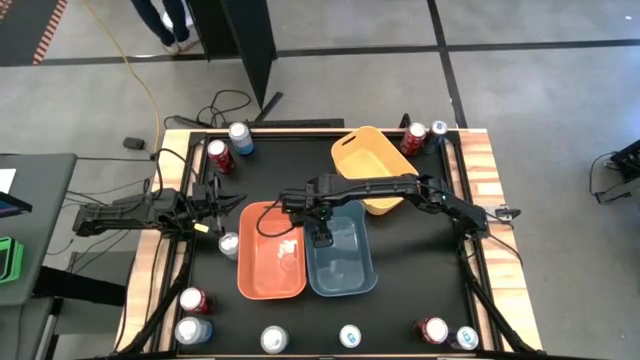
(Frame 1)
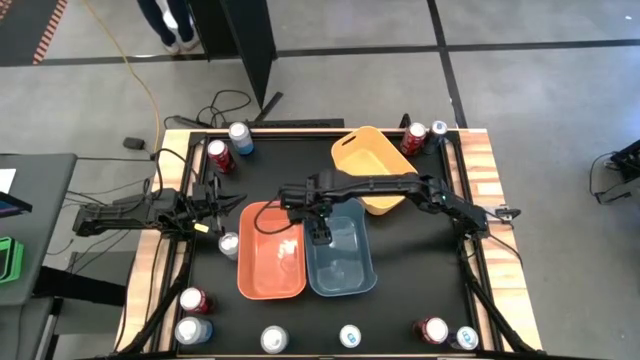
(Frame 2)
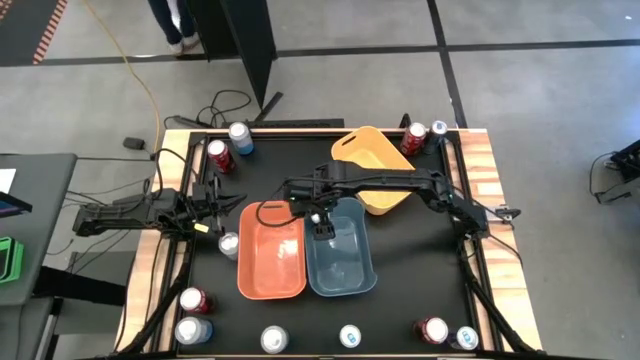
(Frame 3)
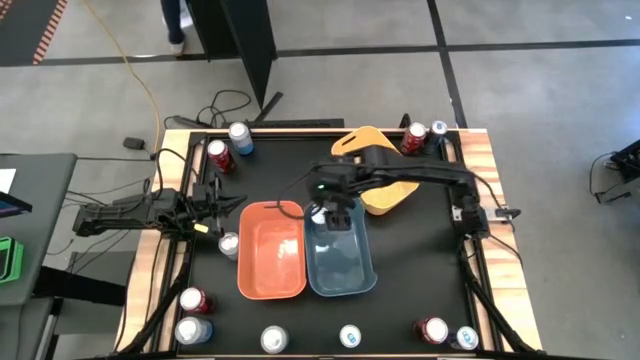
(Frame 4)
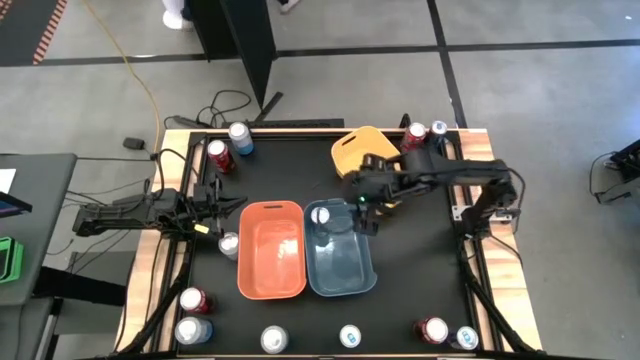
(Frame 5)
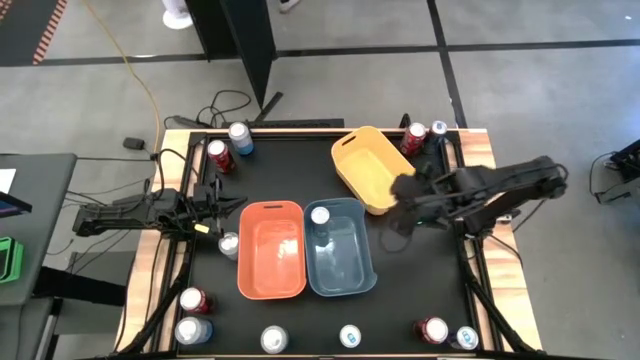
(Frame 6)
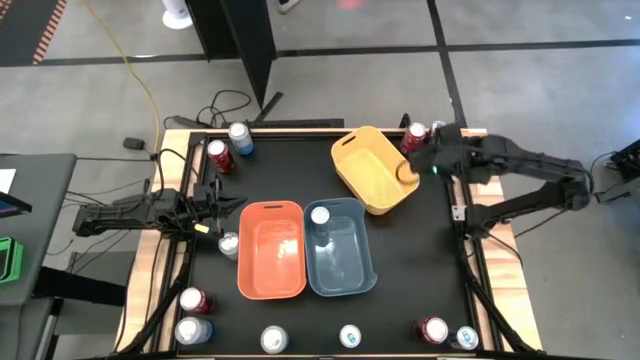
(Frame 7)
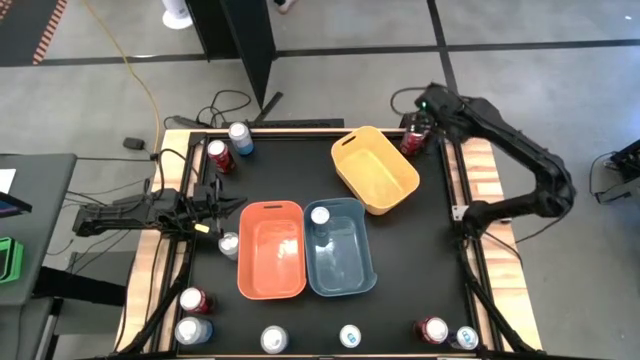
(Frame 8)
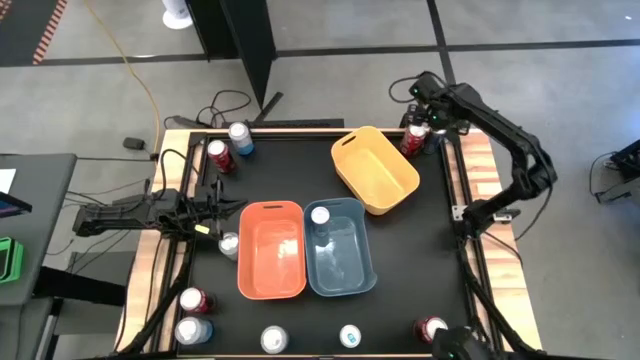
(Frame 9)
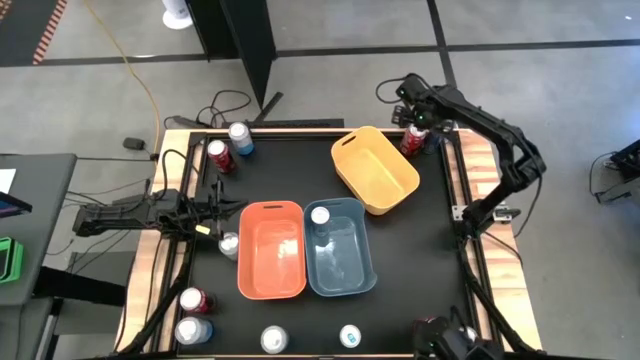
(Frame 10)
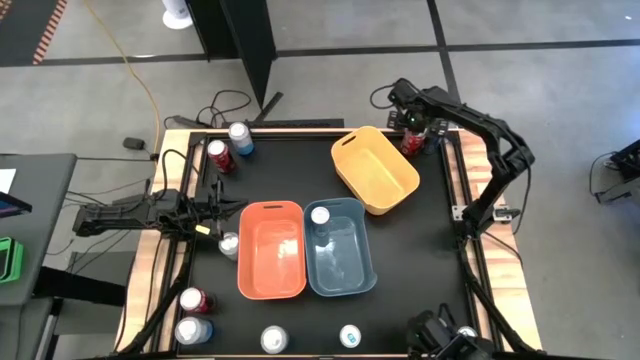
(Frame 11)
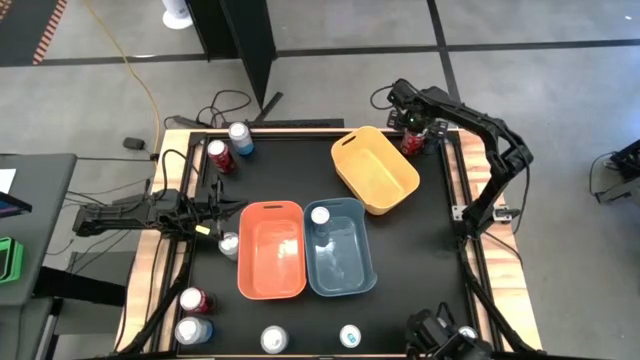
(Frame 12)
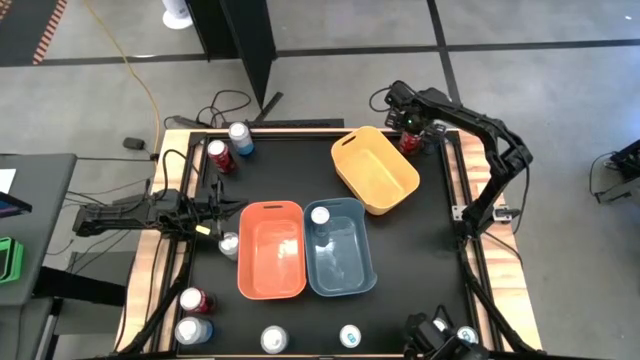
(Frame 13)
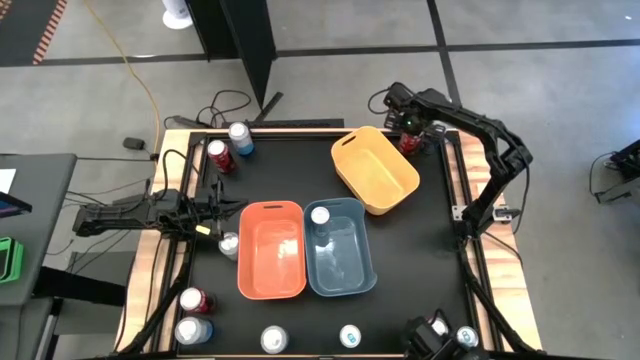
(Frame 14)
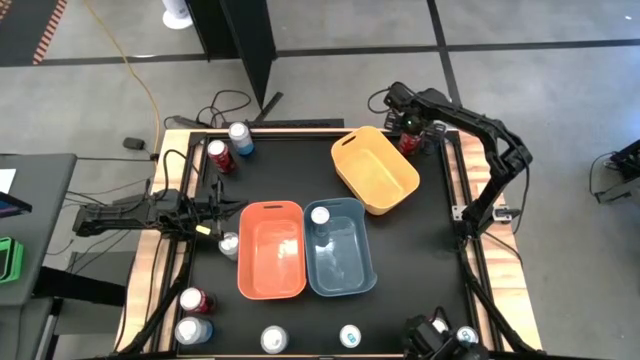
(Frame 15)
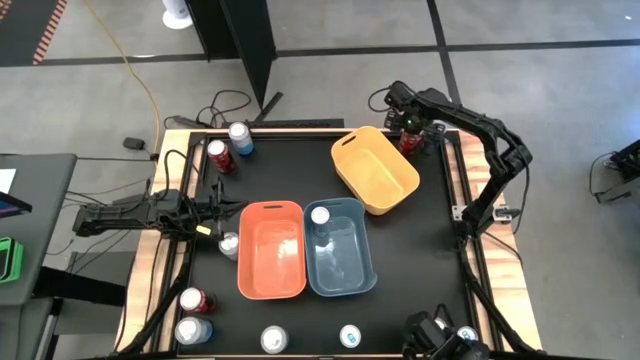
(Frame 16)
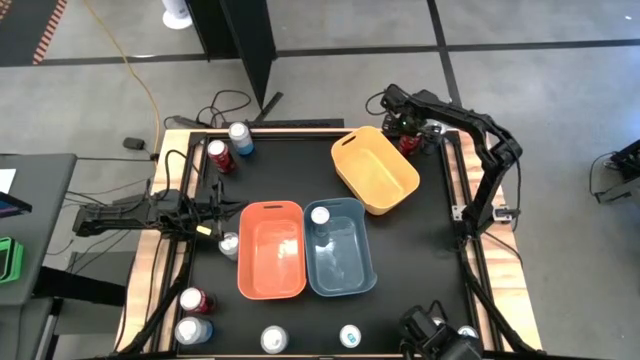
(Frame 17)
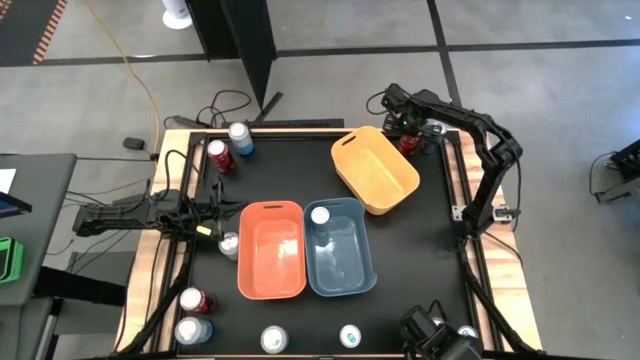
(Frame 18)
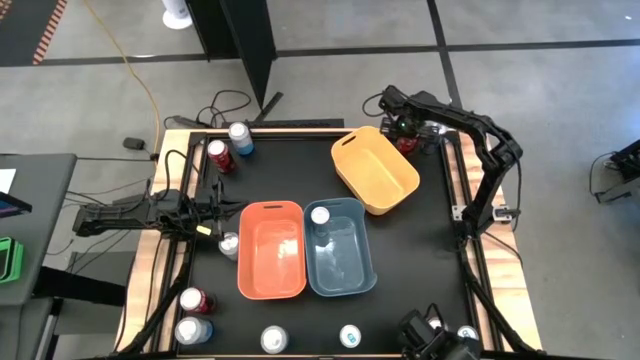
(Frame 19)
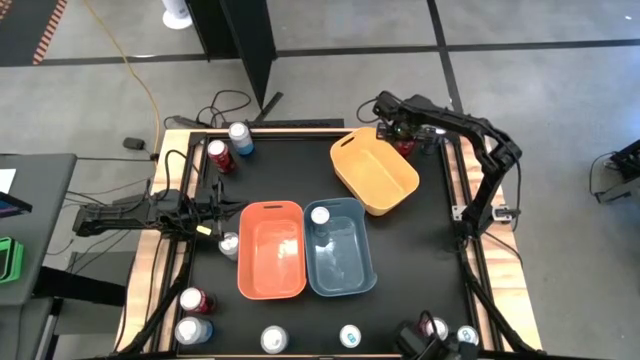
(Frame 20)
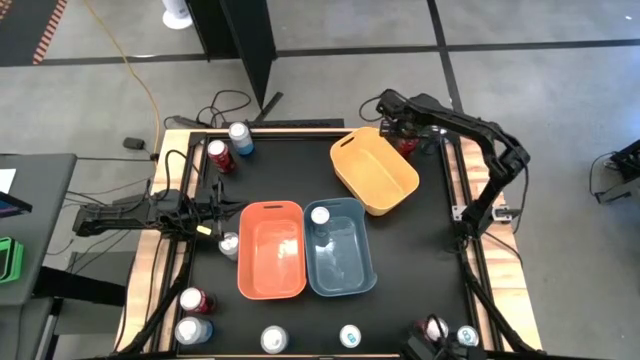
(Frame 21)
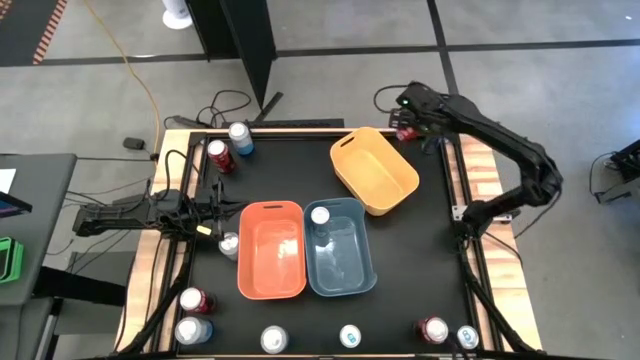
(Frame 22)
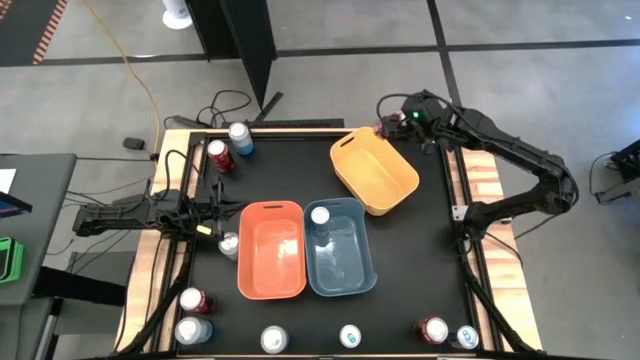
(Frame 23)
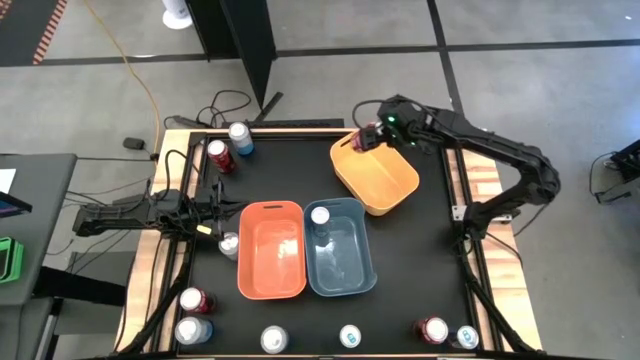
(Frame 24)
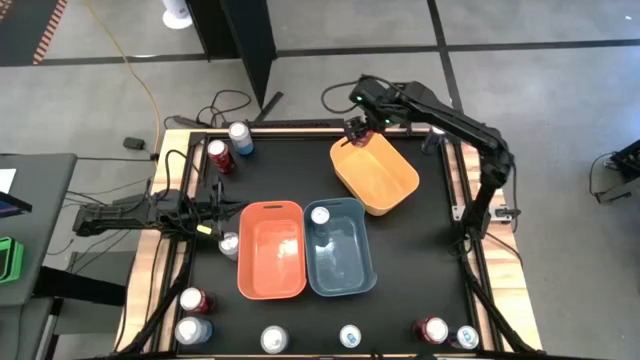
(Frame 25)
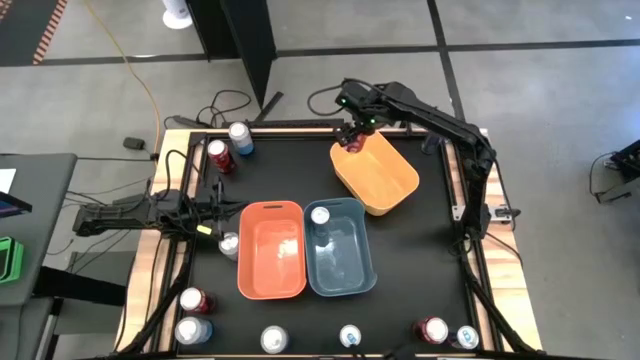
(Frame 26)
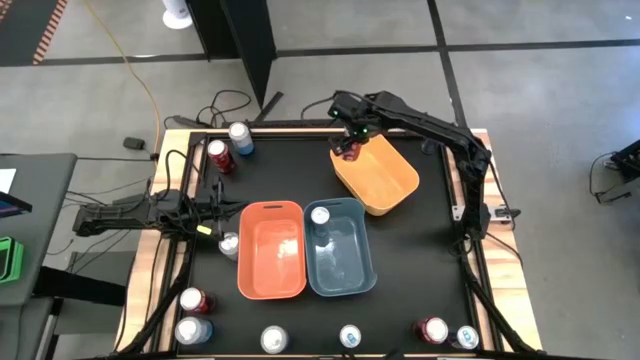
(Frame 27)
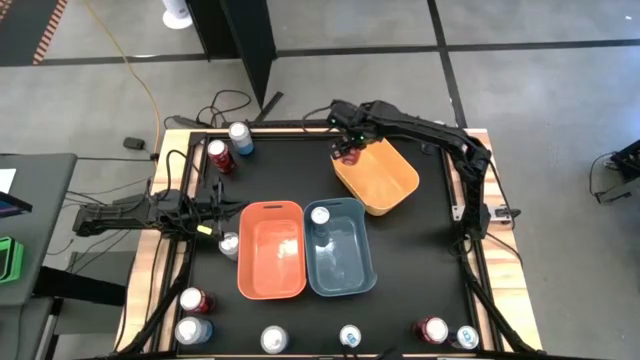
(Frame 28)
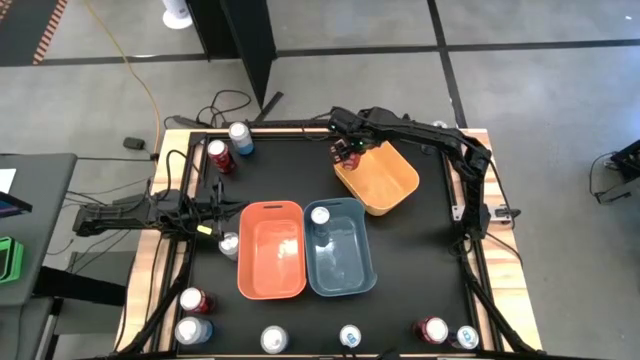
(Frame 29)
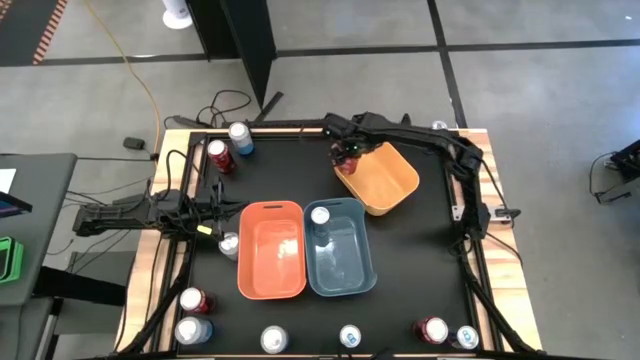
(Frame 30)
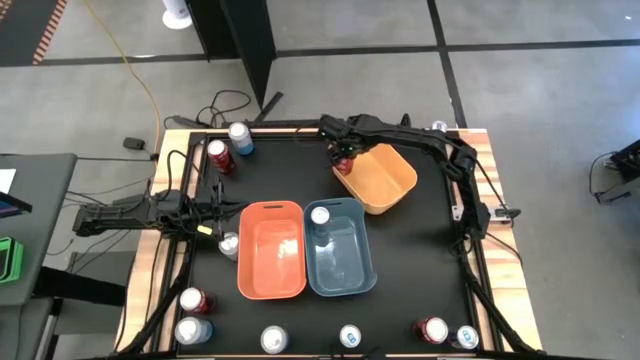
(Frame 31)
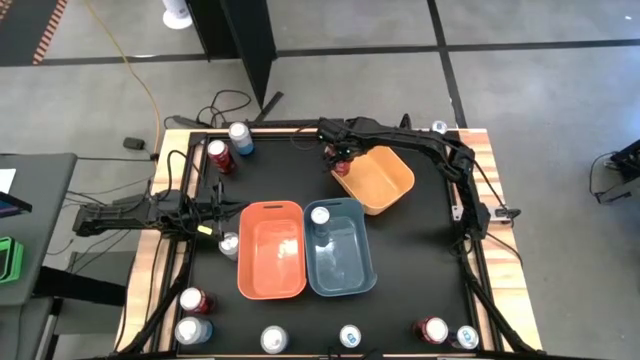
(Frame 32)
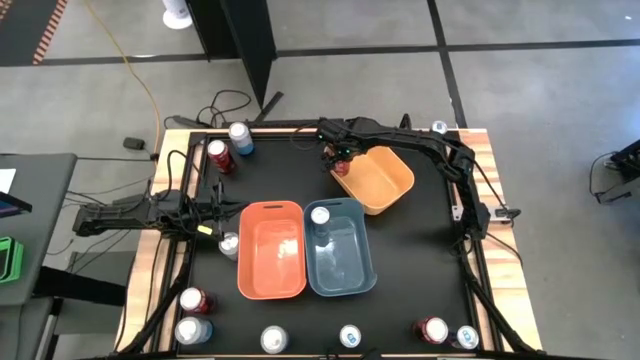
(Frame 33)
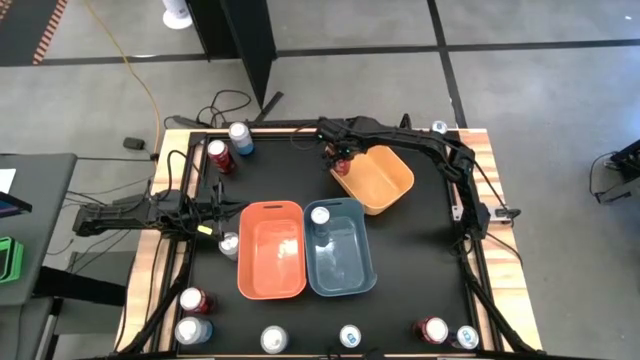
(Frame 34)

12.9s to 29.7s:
Task: Sort soda cans
Put the top right red soda can into the yellow bin
